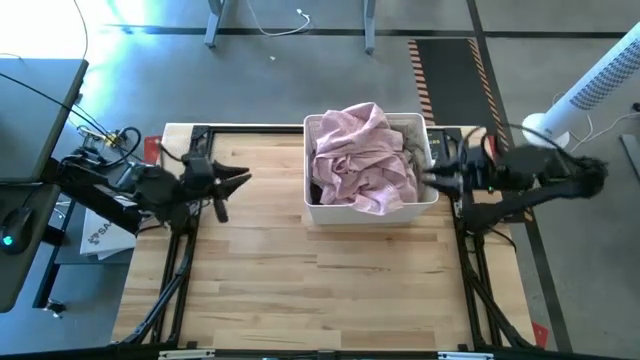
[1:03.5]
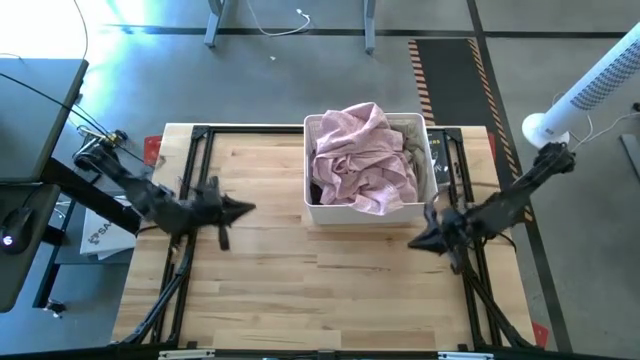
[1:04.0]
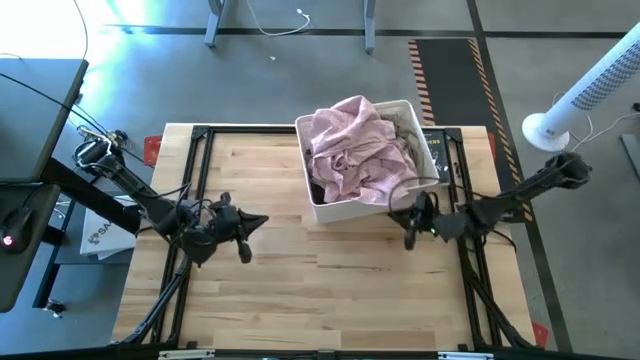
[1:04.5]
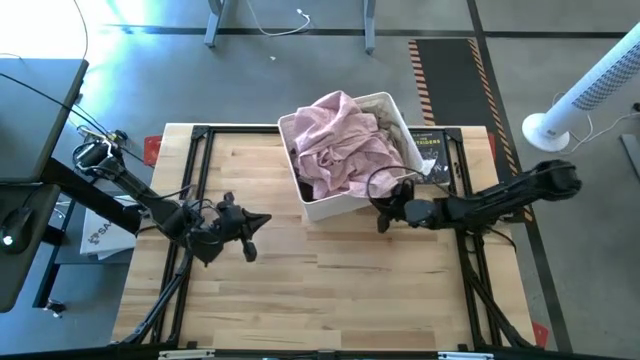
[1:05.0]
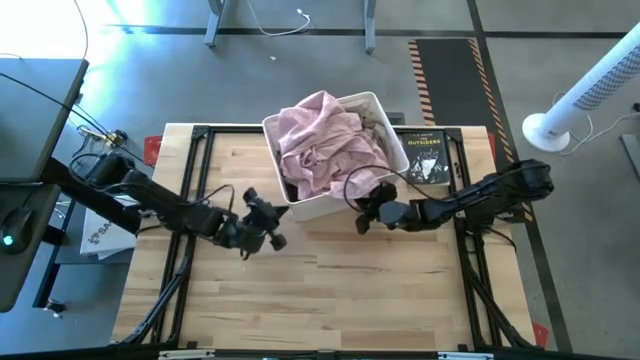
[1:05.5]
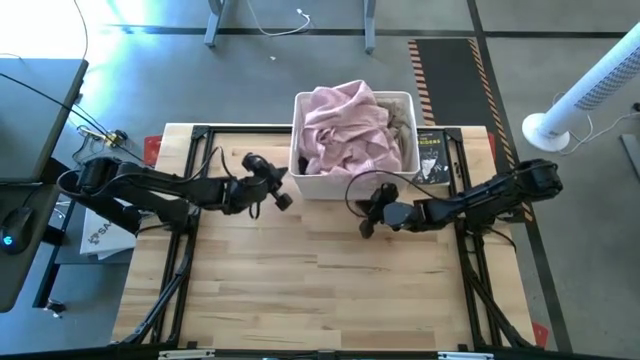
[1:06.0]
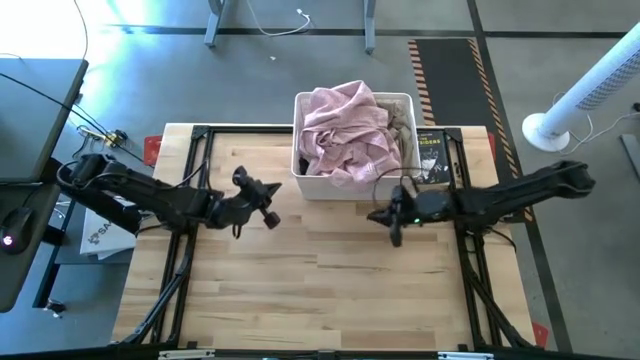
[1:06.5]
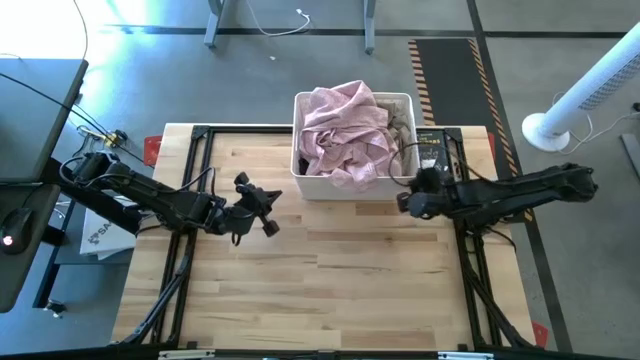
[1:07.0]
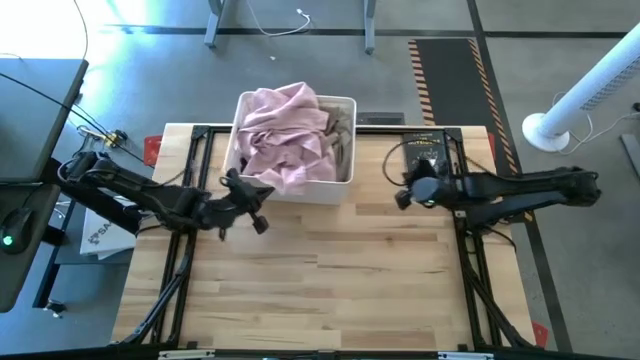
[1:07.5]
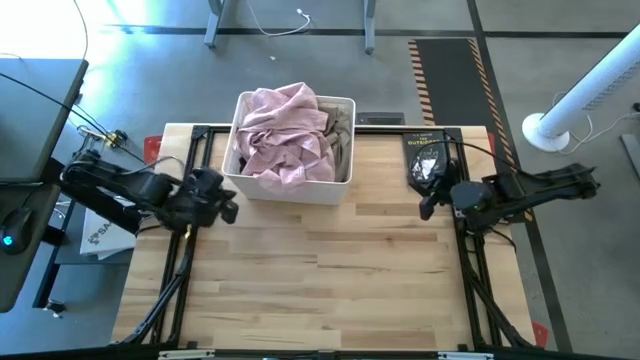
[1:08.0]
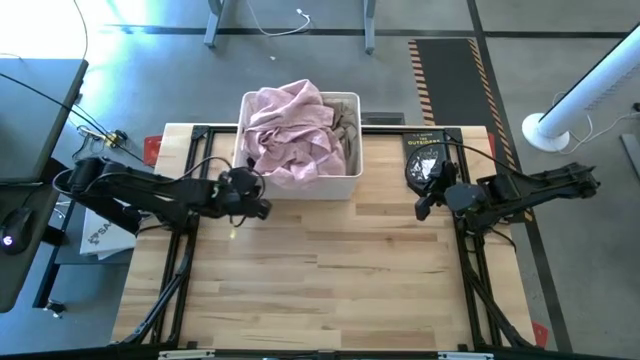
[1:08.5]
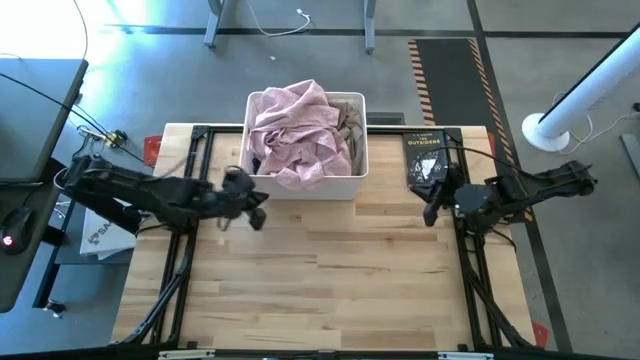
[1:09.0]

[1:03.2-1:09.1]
Task: Sort clothes
Move the laundry bin to the top center of the table

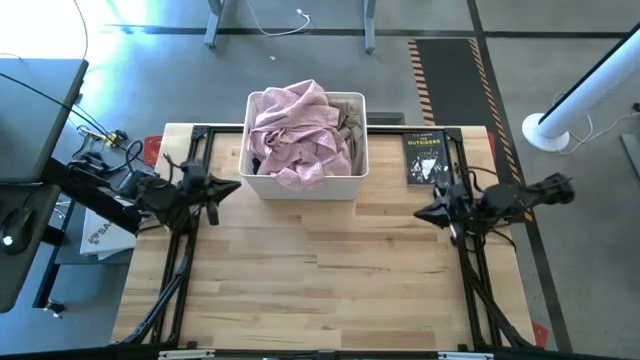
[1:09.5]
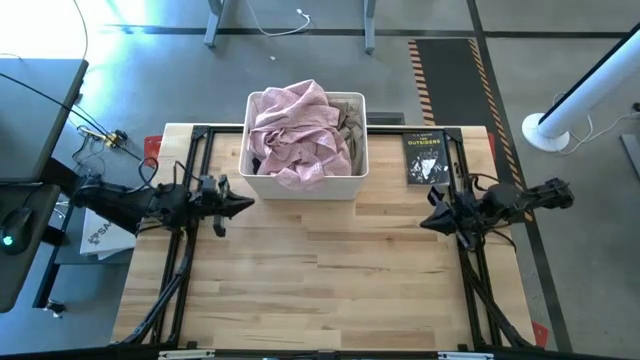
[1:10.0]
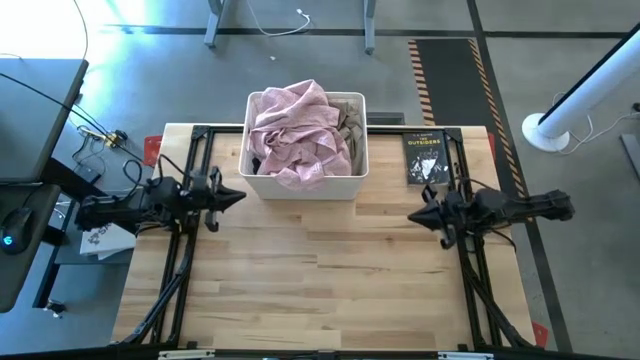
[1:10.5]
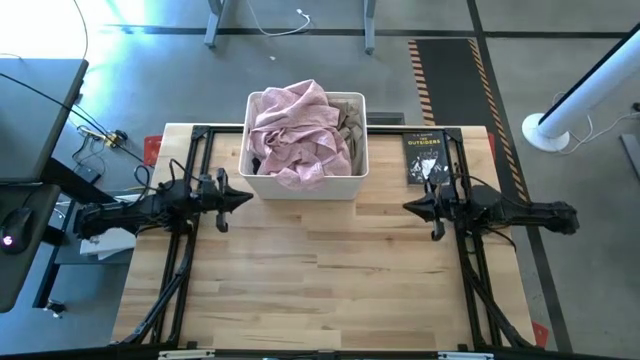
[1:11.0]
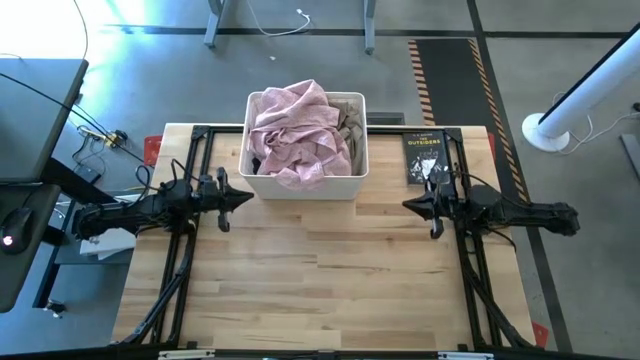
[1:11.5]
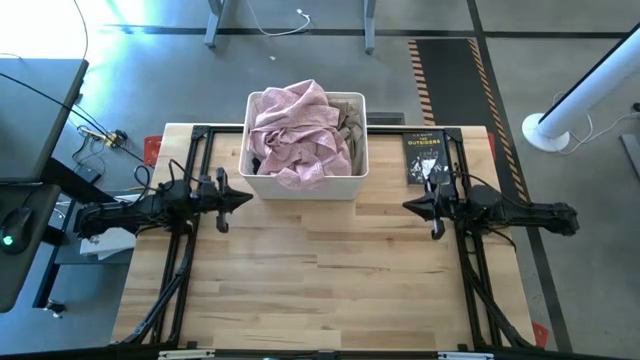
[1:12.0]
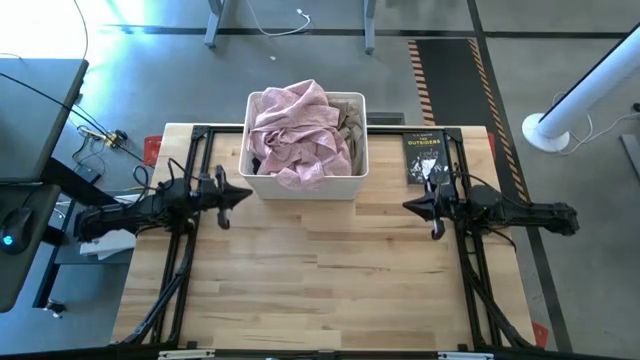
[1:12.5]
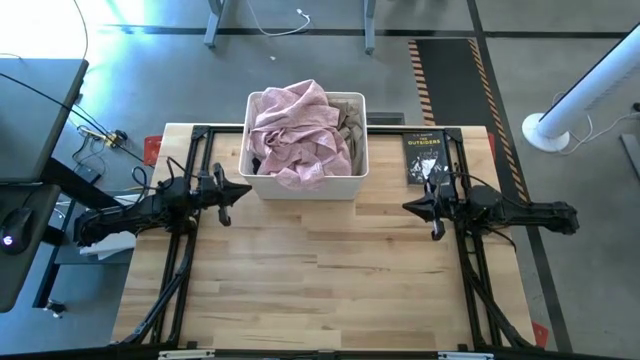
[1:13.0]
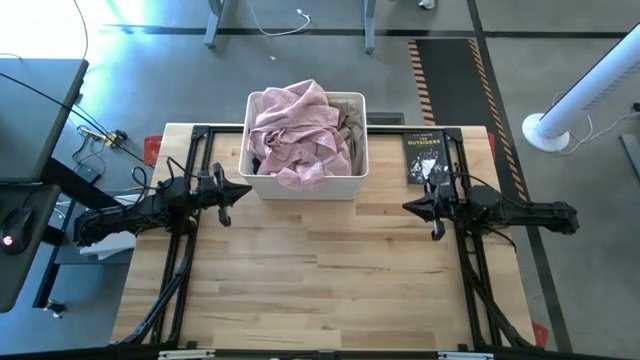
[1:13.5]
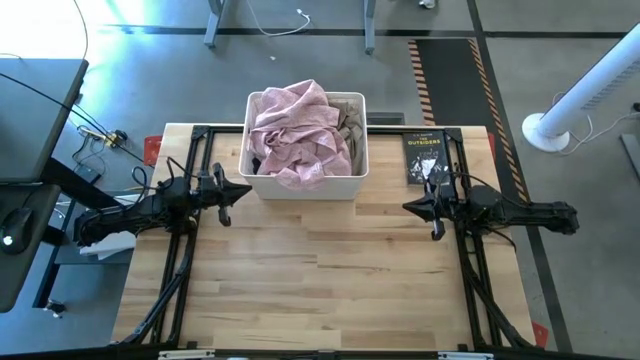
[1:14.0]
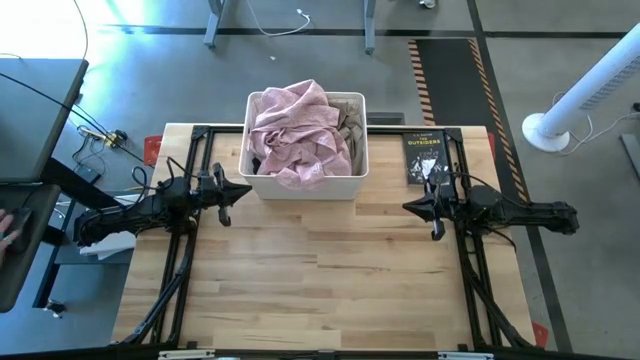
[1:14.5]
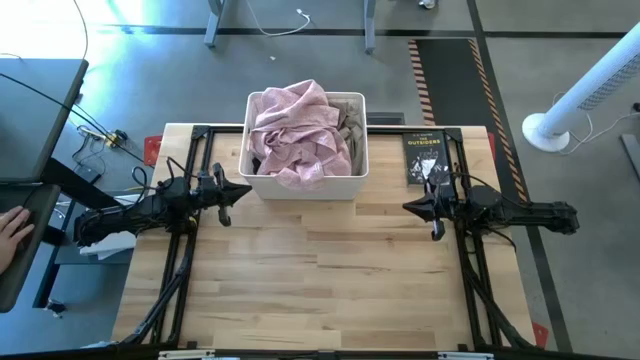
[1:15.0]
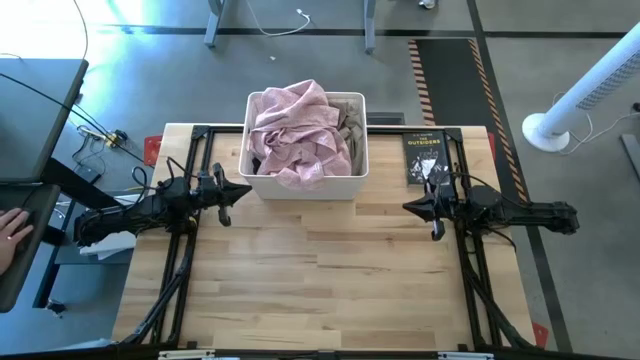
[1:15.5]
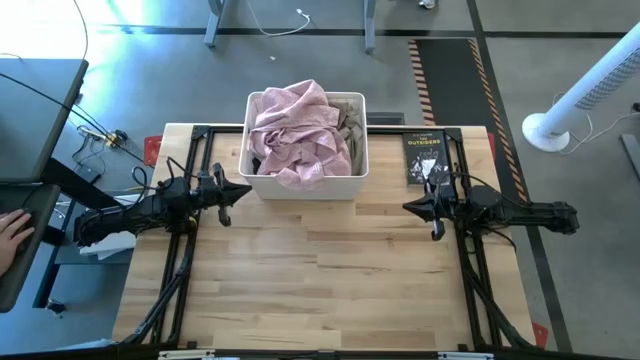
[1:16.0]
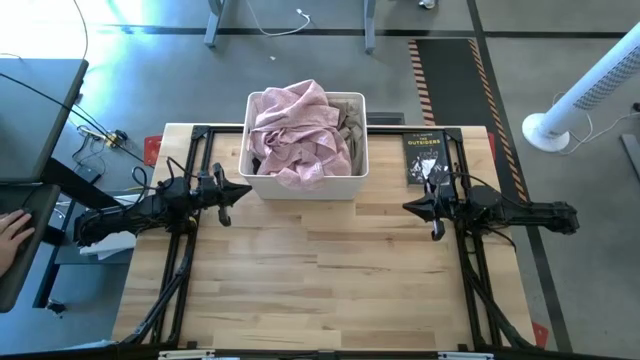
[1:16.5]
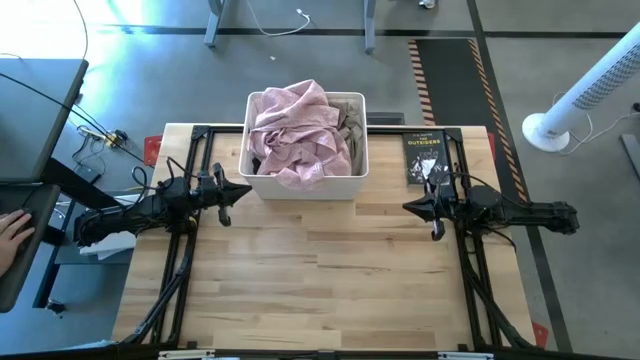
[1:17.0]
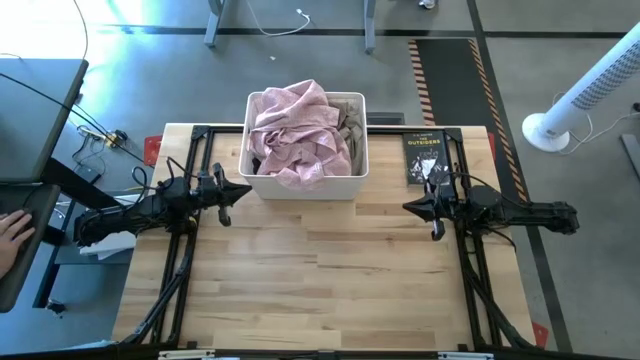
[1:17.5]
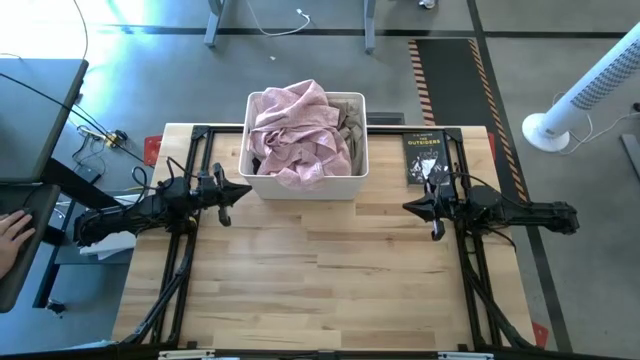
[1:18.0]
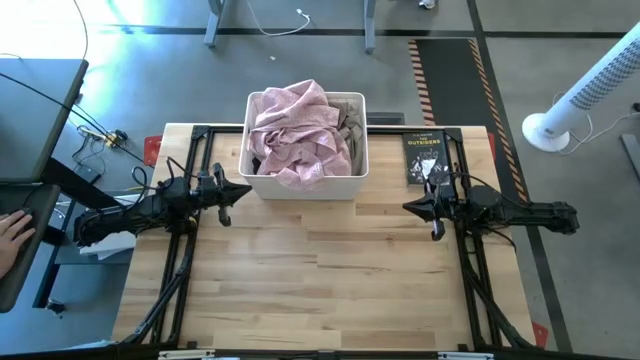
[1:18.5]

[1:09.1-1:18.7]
Return to Home Position
